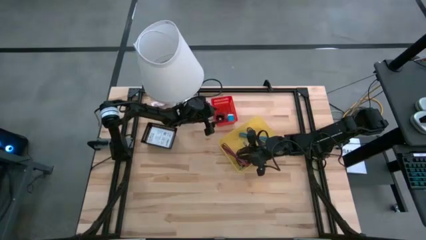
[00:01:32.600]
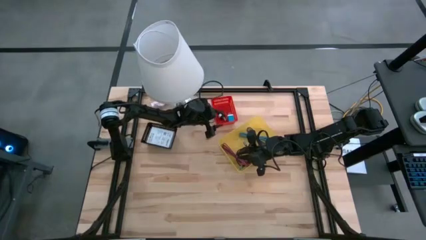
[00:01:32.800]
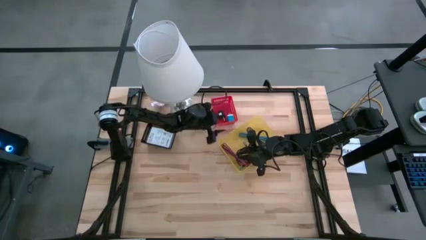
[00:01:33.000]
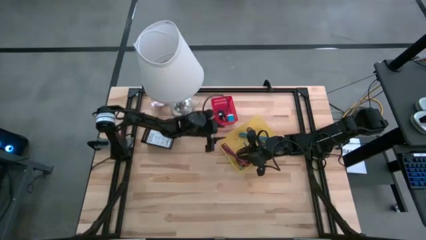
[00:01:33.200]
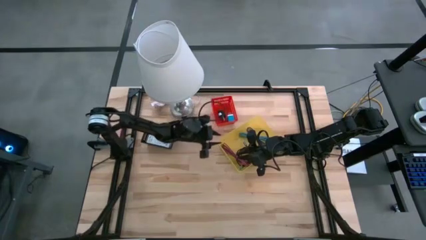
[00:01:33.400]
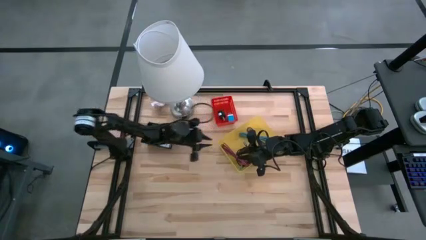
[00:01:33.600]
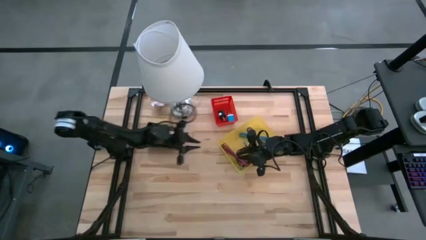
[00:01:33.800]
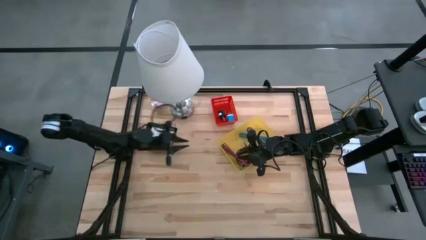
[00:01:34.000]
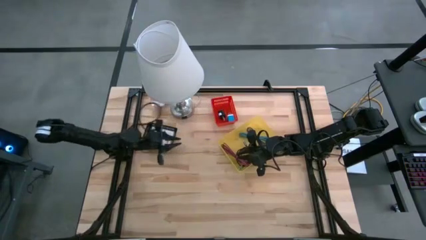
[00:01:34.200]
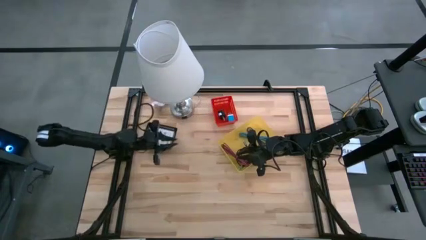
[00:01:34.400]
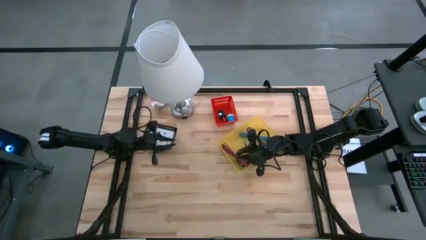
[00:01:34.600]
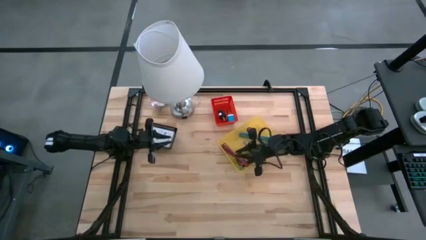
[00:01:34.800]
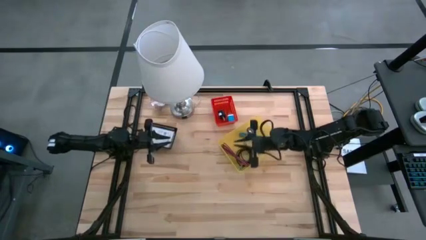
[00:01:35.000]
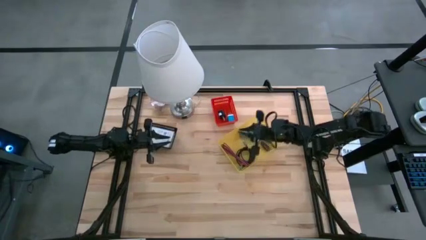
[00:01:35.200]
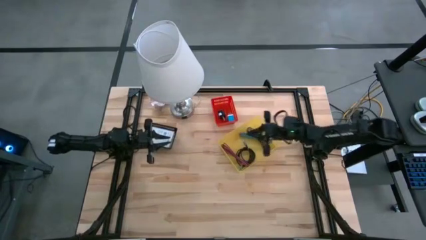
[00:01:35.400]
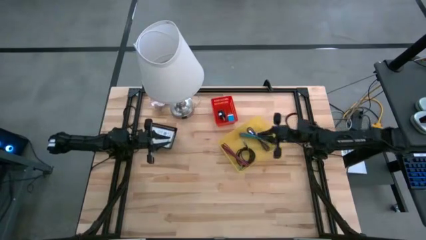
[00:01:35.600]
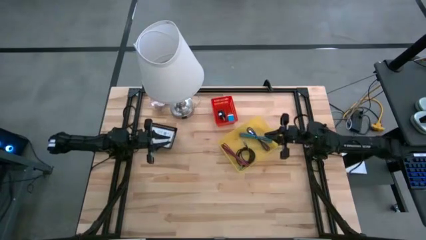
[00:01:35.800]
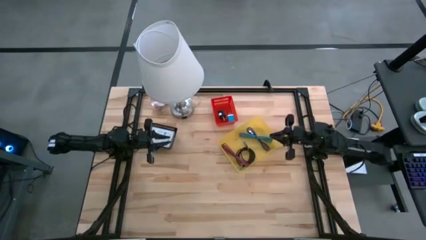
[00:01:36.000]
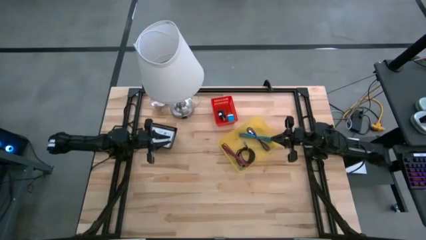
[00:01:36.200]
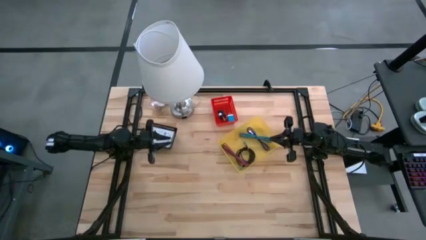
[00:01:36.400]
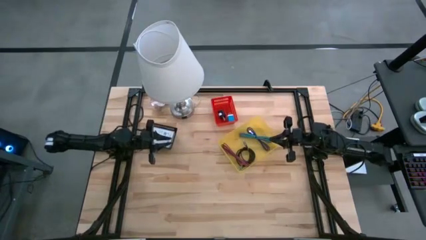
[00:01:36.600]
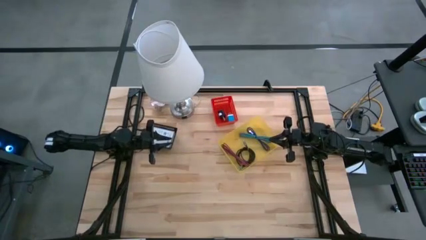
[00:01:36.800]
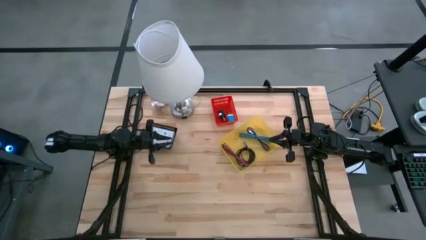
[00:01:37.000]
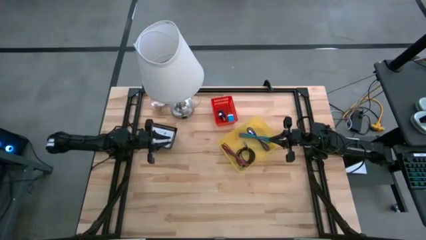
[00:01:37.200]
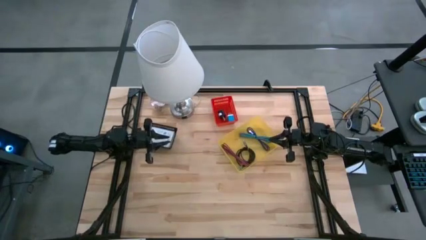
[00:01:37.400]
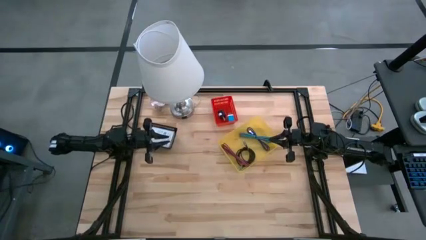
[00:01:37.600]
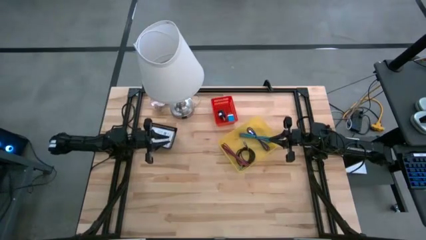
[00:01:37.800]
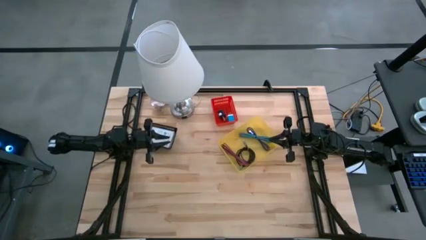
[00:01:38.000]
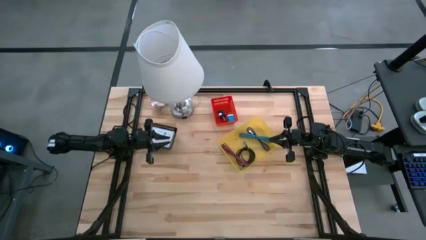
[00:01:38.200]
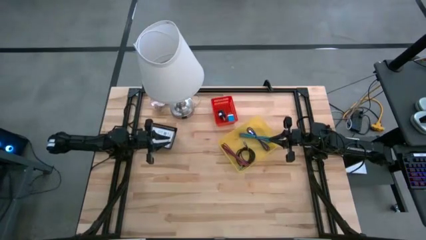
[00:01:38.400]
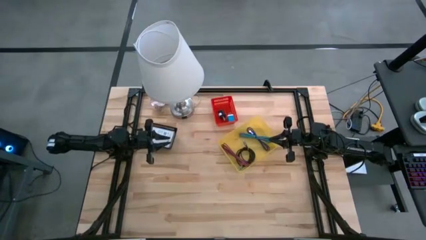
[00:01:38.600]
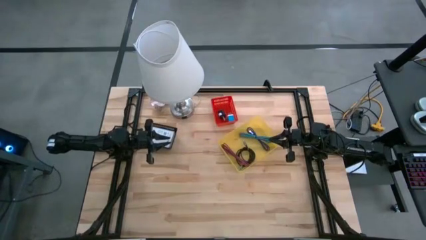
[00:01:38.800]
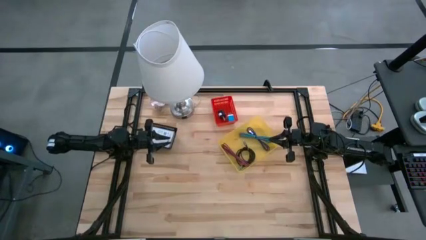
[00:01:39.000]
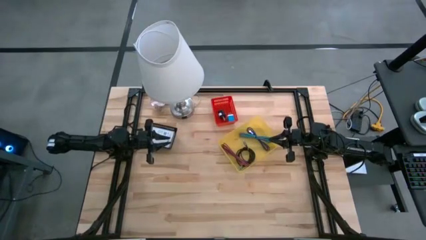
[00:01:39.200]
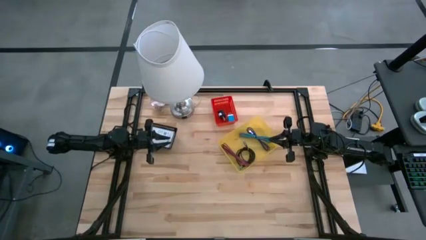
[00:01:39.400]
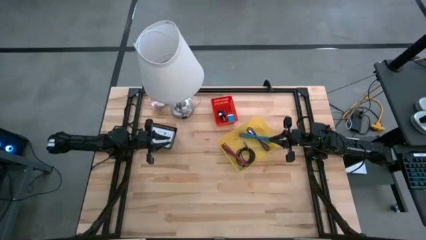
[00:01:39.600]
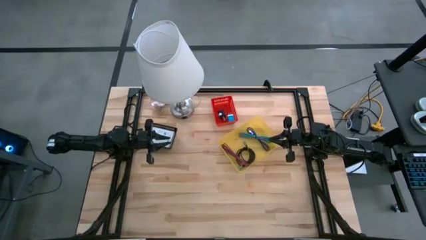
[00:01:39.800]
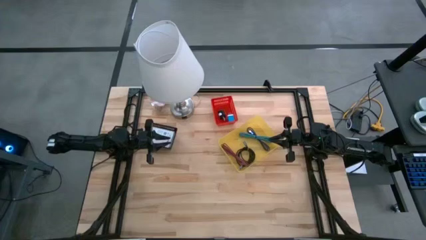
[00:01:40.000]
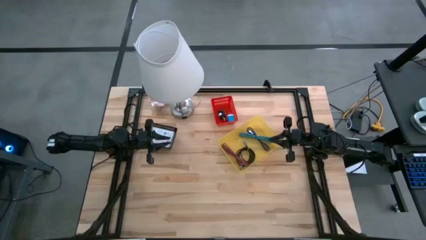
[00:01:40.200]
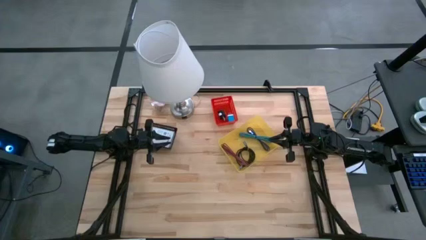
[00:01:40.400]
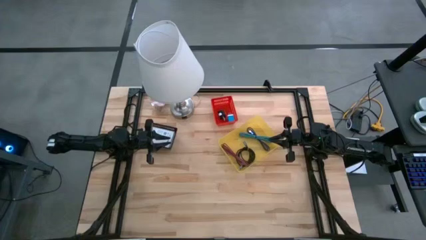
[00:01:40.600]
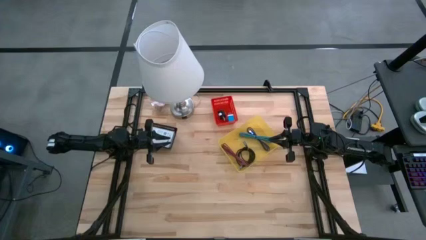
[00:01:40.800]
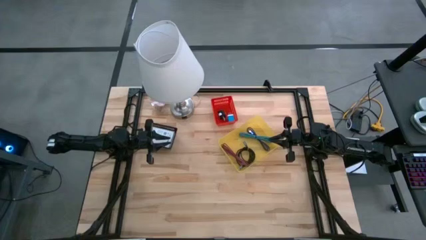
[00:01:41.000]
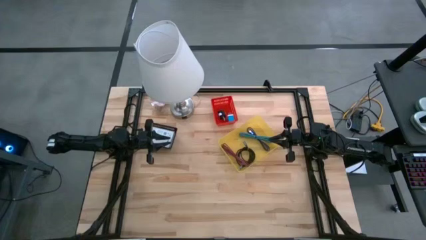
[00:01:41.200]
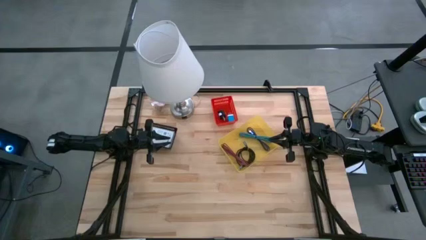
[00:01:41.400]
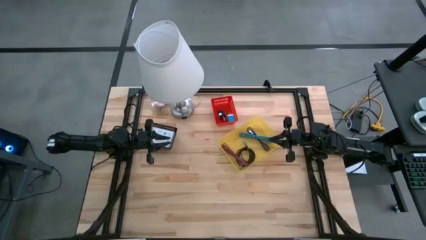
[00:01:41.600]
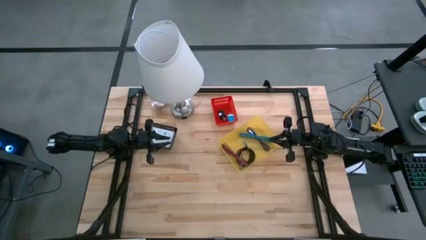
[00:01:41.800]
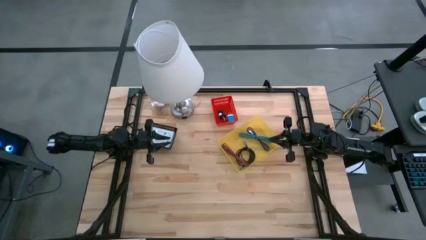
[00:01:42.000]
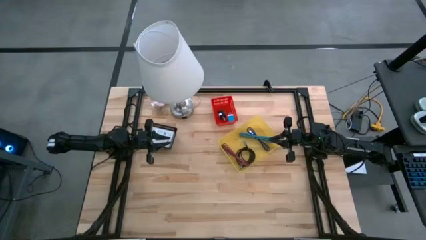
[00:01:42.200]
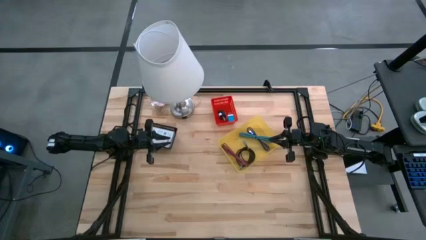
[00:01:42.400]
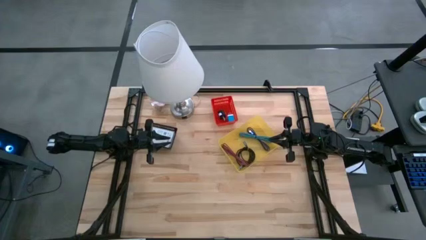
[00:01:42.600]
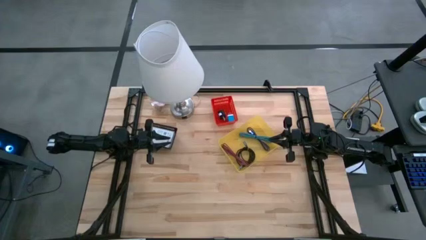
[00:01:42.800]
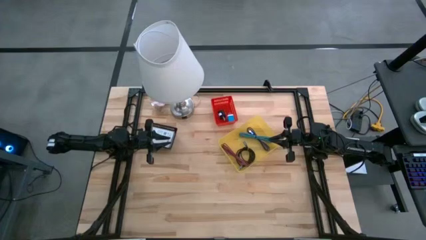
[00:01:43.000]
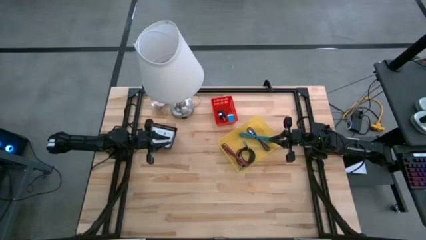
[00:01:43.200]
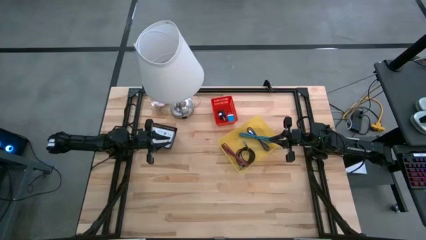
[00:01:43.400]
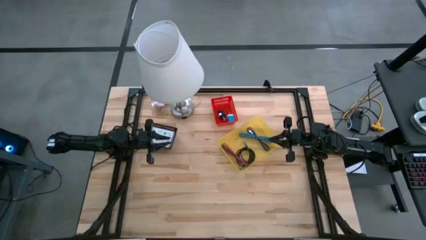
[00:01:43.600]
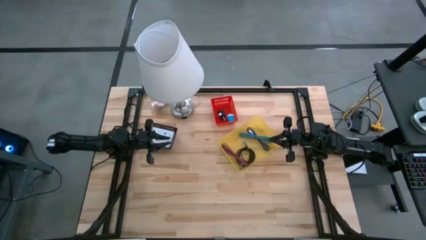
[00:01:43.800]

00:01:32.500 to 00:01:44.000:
Task: Pick and place items into bin
Return to Home Position

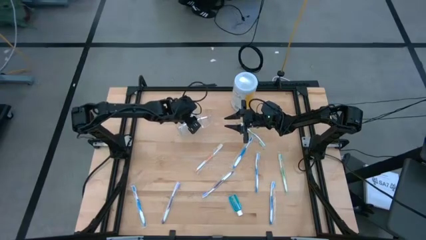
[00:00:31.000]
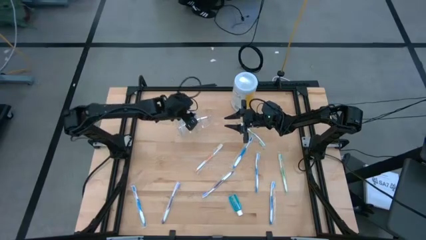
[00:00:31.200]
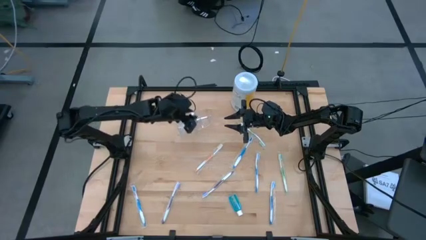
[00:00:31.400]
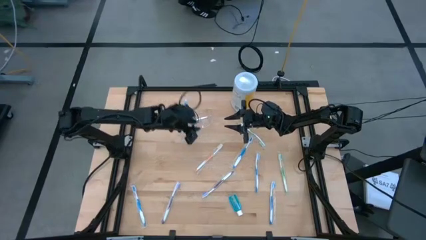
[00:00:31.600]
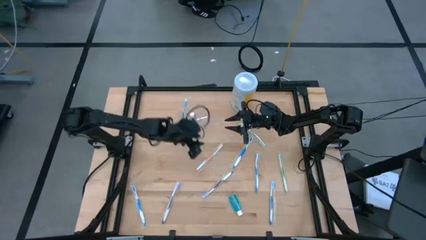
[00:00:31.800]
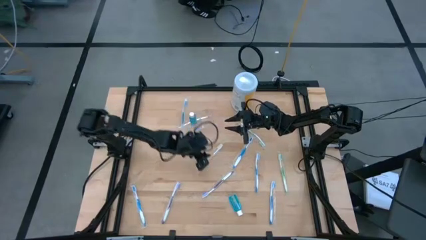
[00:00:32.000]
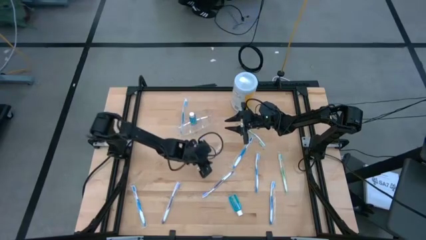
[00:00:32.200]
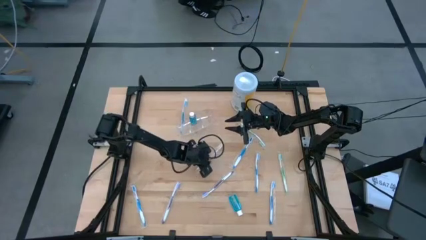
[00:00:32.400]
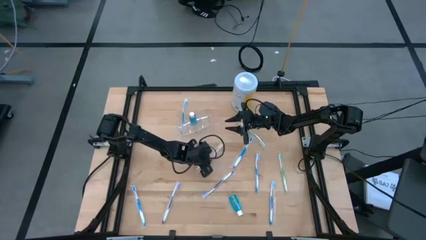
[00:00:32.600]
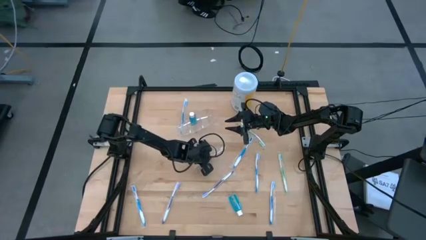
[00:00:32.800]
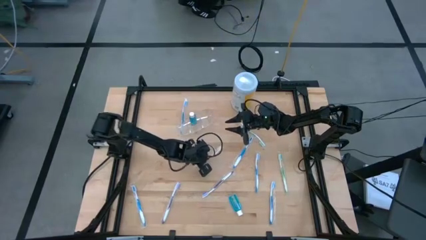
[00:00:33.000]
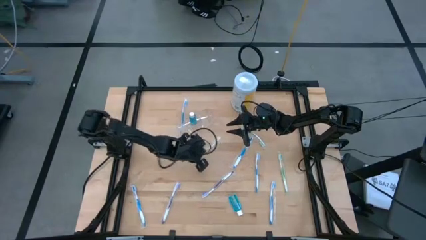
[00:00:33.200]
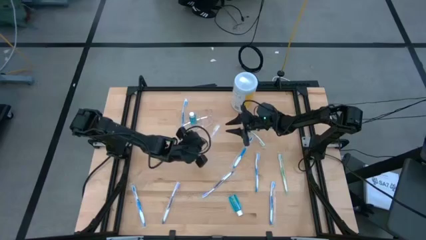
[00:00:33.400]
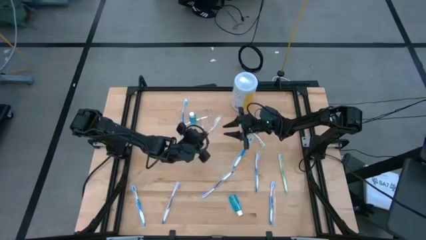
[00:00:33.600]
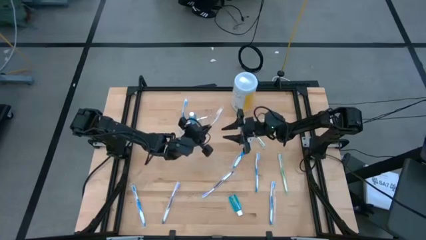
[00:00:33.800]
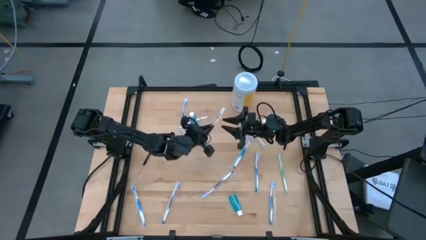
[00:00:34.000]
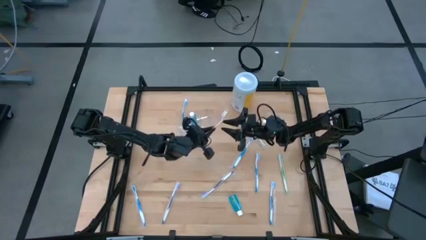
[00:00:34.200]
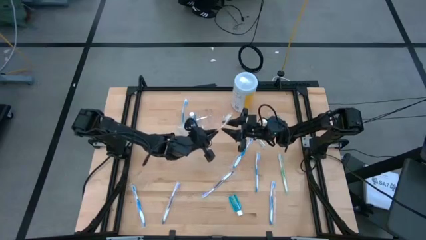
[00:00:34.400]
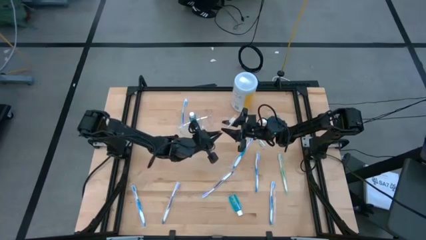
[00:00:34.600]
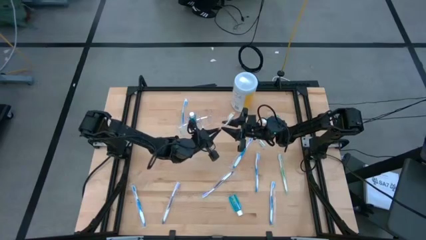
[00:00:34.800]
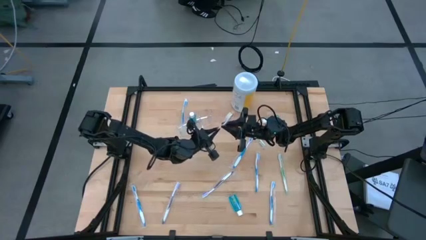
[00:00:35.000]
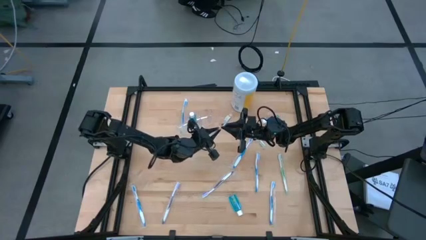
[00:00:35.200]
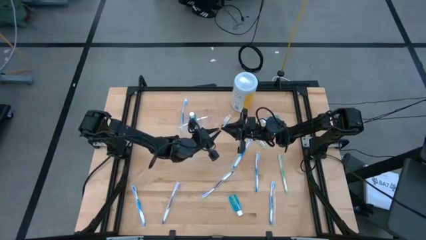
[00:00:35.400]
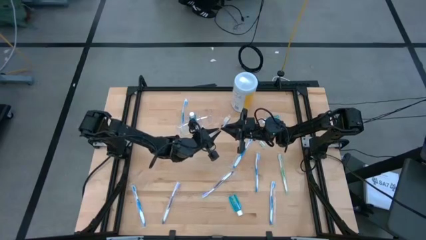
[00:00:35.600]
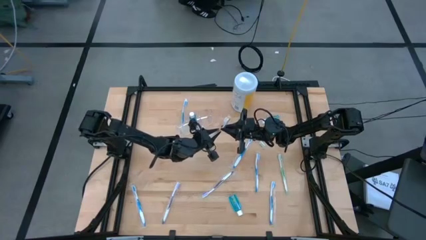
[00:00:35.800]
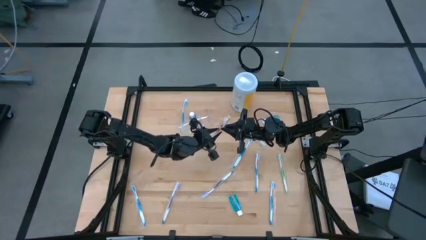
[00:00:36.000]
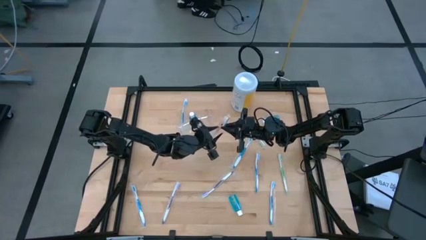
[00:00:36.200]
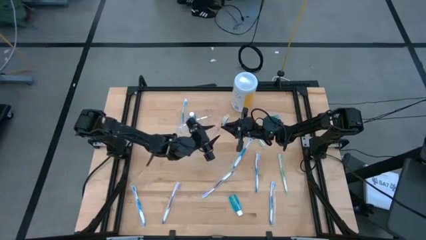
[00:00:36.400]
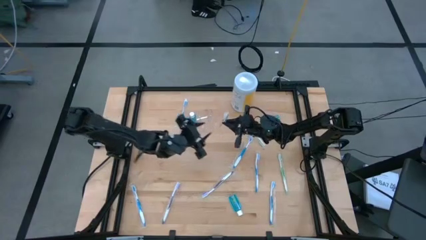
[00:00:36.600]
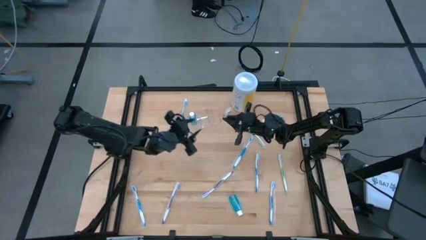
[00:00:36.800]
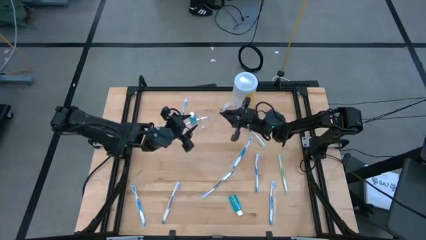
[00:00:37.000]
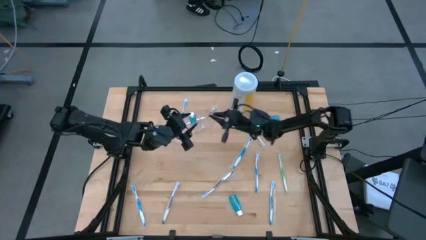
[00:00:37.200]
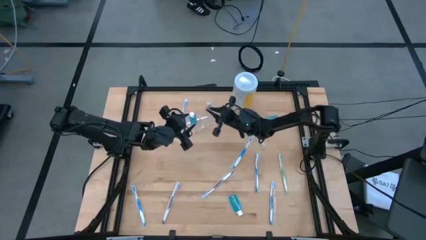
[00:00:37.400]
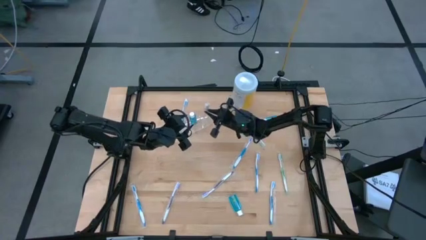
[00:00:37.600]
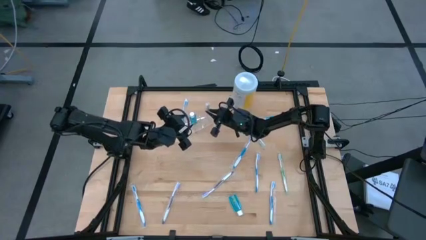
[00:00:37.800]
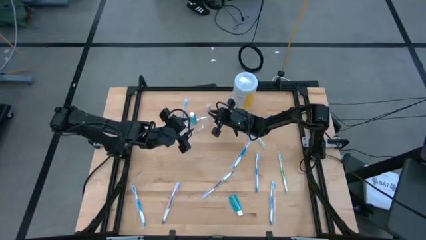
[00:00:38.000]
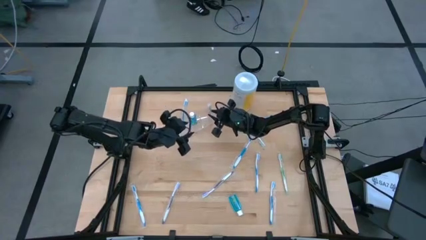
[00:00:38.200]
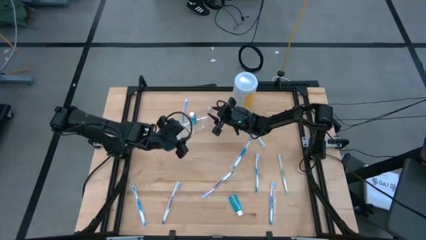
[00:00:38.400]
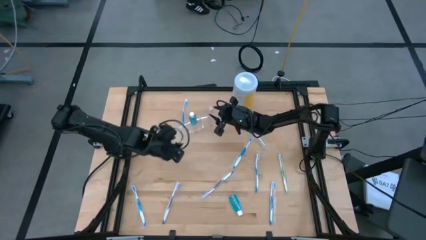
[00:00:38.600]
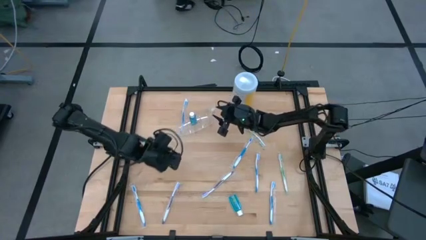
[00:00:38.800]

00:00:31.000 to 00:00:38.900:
Task: Pick & Place toothbrushing station
Put the orange toothbrush into the transparent organizer
